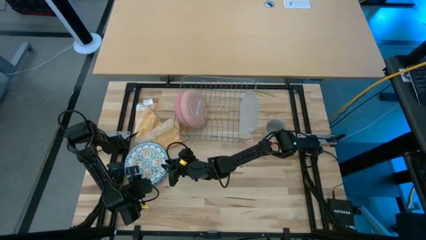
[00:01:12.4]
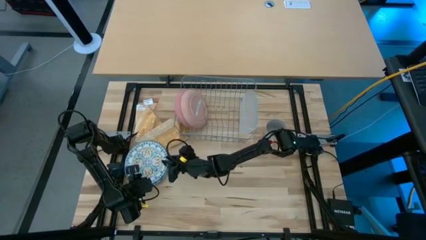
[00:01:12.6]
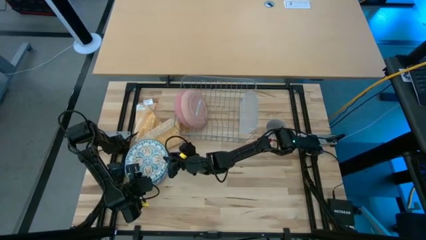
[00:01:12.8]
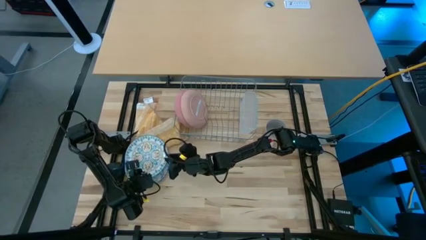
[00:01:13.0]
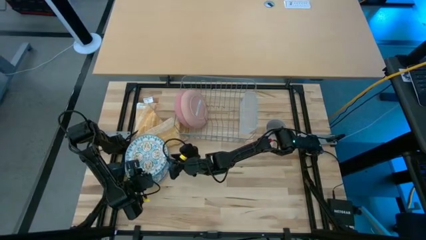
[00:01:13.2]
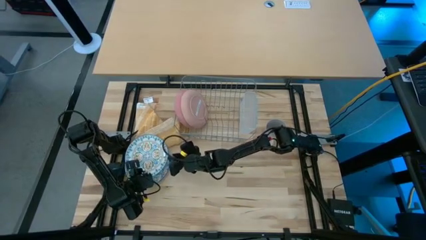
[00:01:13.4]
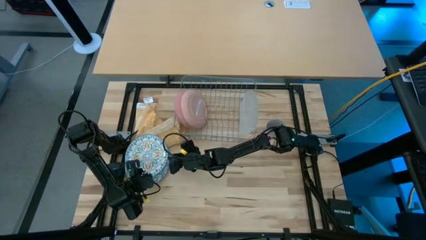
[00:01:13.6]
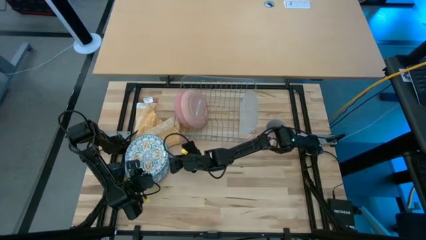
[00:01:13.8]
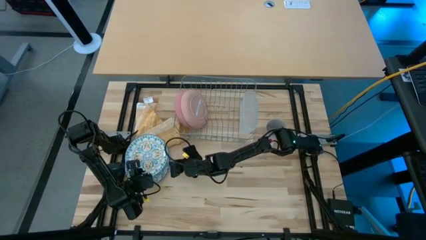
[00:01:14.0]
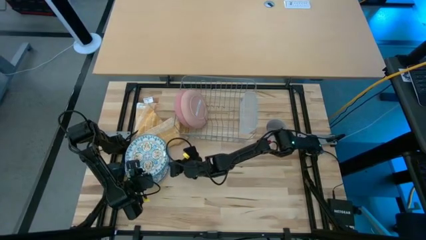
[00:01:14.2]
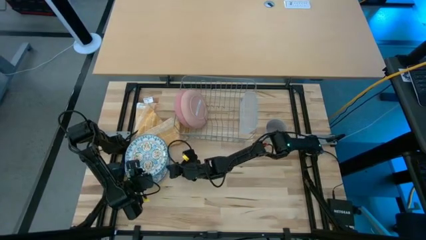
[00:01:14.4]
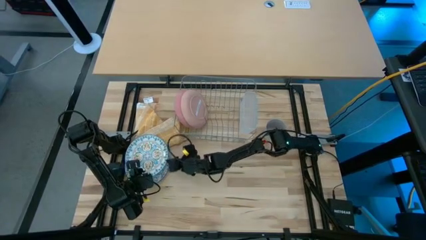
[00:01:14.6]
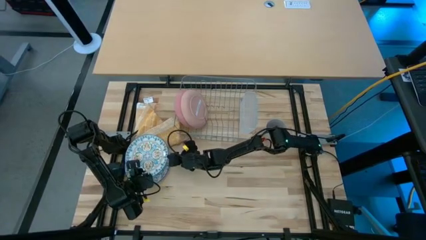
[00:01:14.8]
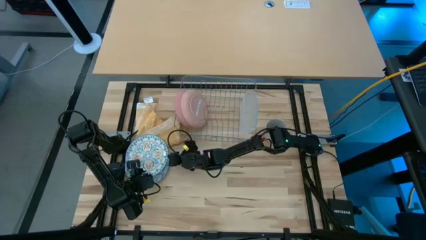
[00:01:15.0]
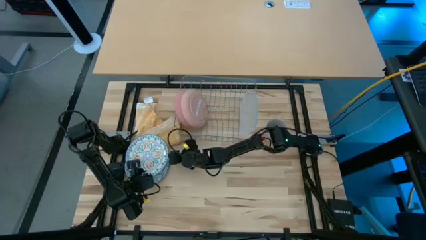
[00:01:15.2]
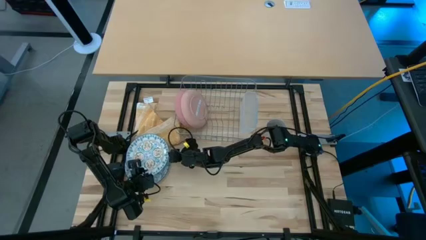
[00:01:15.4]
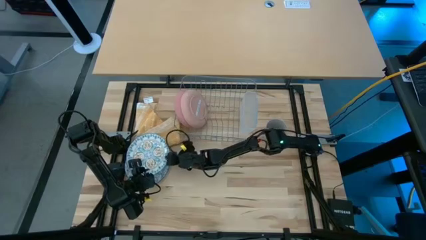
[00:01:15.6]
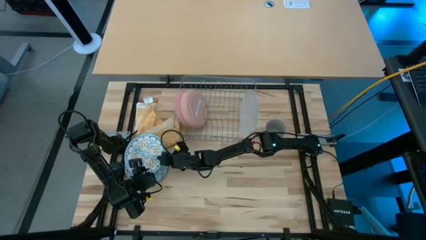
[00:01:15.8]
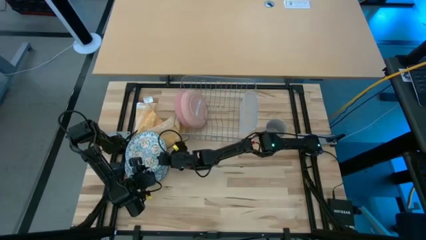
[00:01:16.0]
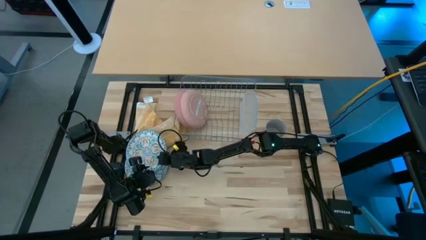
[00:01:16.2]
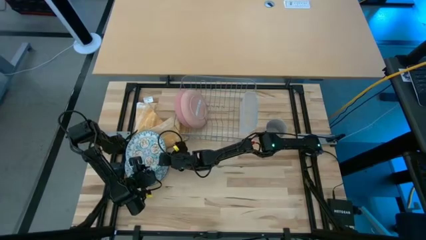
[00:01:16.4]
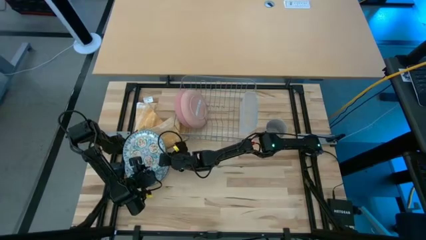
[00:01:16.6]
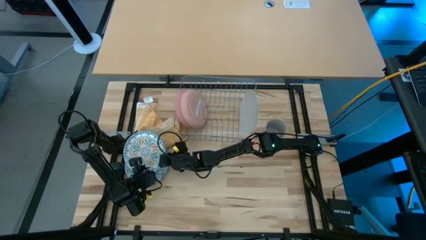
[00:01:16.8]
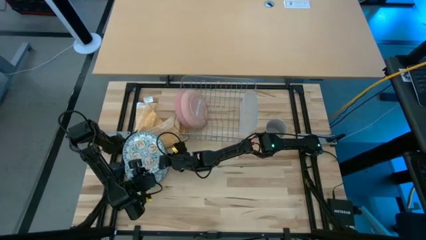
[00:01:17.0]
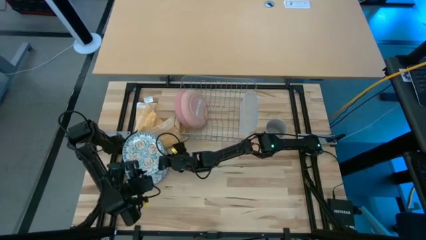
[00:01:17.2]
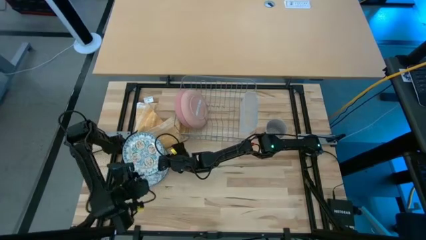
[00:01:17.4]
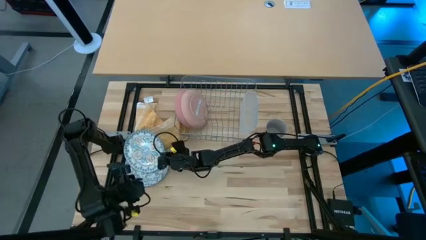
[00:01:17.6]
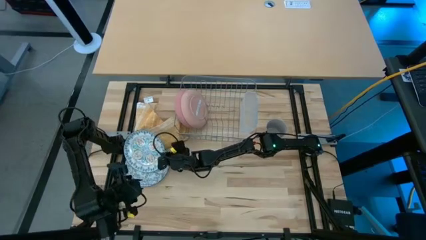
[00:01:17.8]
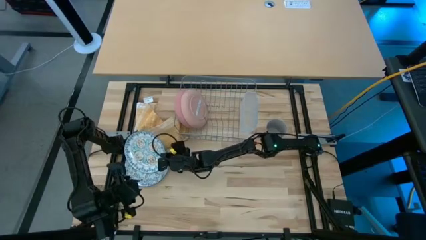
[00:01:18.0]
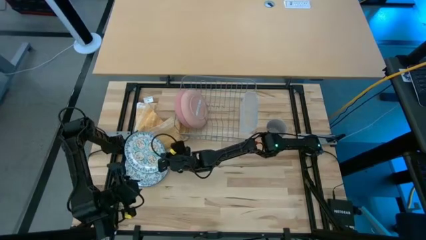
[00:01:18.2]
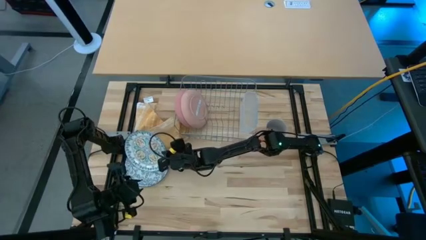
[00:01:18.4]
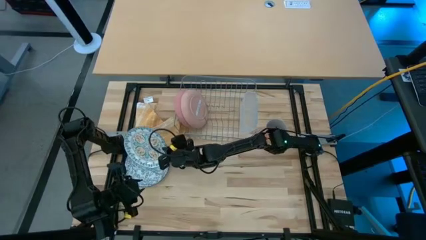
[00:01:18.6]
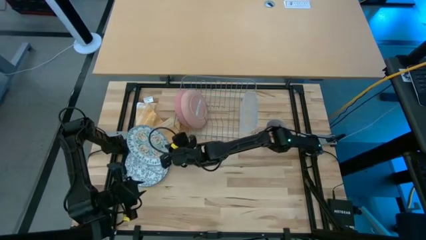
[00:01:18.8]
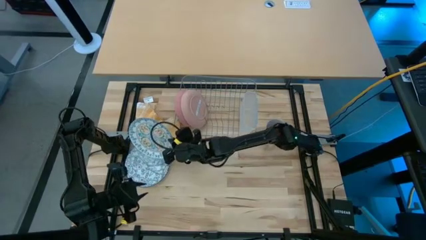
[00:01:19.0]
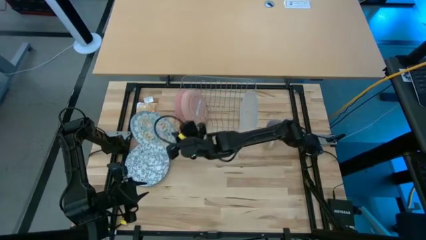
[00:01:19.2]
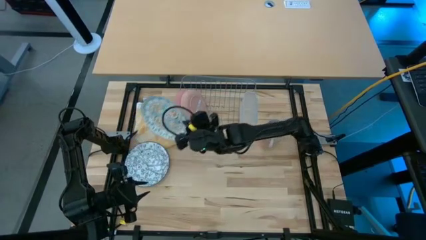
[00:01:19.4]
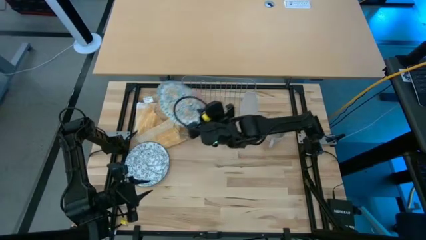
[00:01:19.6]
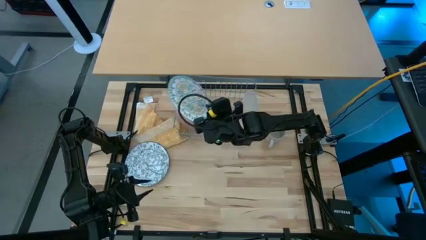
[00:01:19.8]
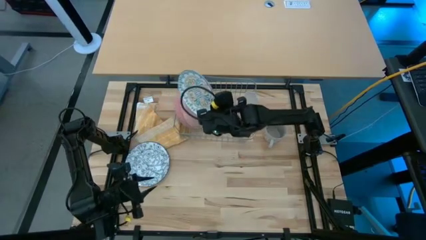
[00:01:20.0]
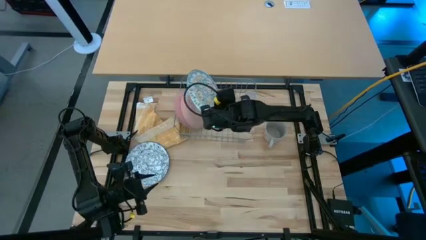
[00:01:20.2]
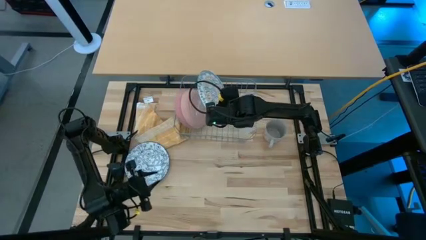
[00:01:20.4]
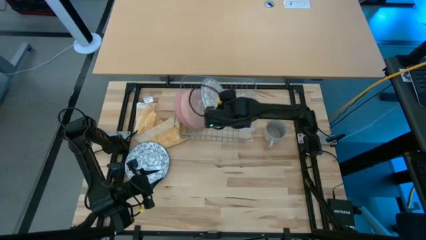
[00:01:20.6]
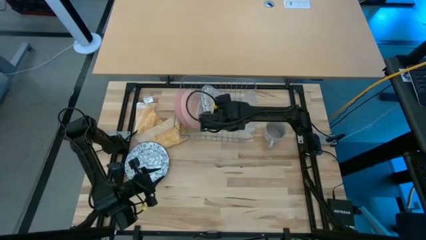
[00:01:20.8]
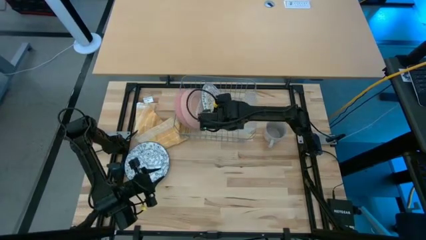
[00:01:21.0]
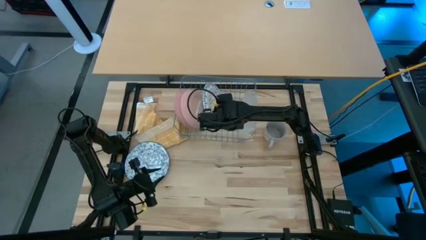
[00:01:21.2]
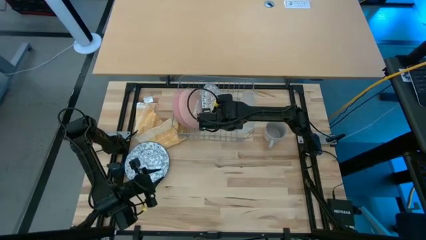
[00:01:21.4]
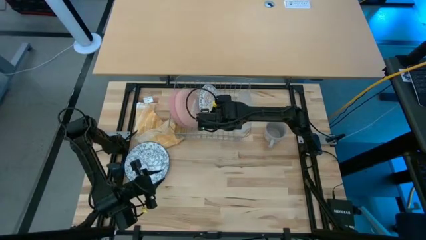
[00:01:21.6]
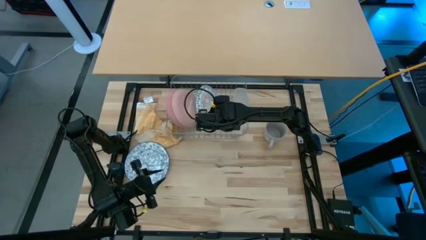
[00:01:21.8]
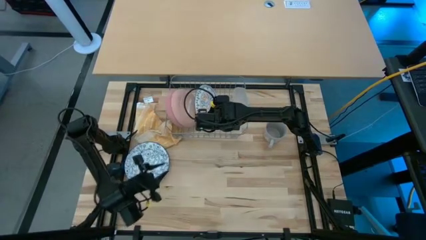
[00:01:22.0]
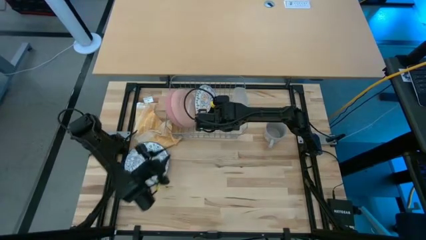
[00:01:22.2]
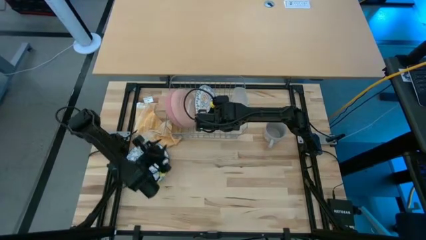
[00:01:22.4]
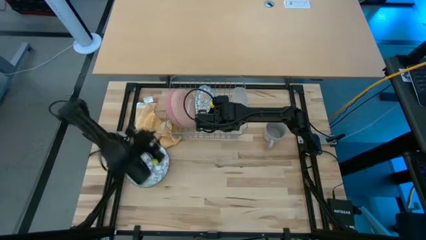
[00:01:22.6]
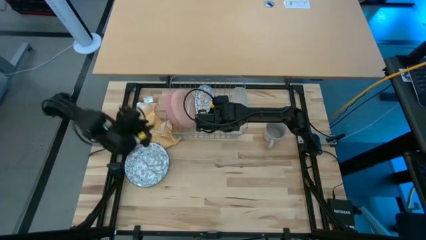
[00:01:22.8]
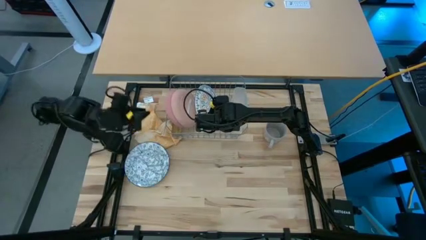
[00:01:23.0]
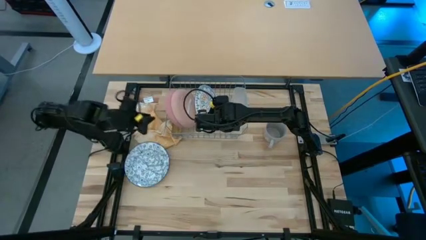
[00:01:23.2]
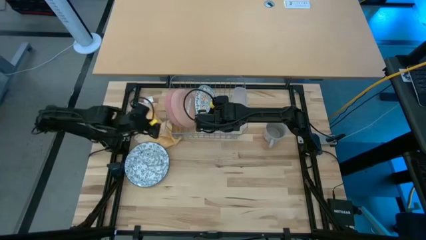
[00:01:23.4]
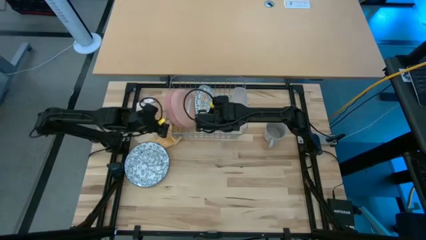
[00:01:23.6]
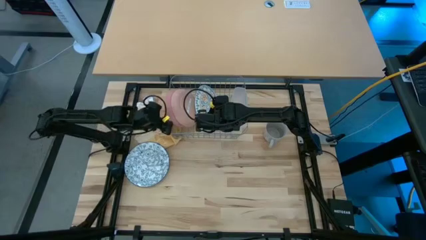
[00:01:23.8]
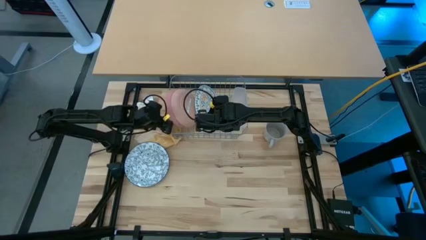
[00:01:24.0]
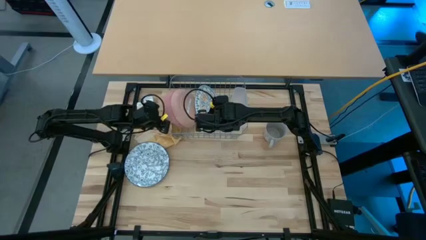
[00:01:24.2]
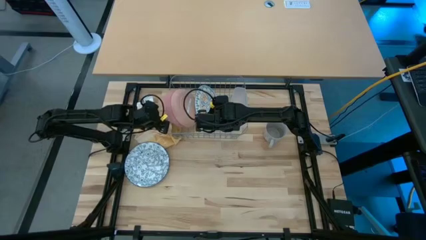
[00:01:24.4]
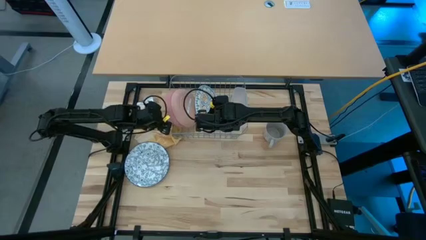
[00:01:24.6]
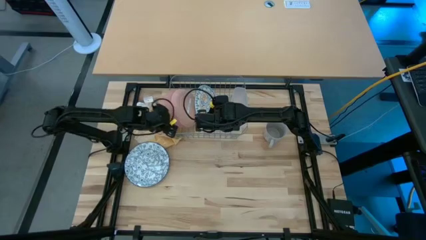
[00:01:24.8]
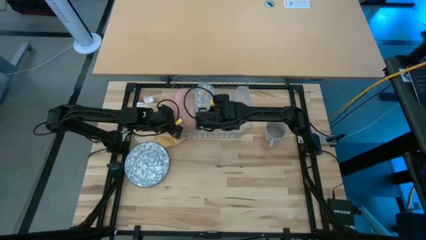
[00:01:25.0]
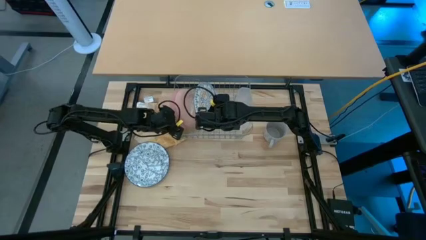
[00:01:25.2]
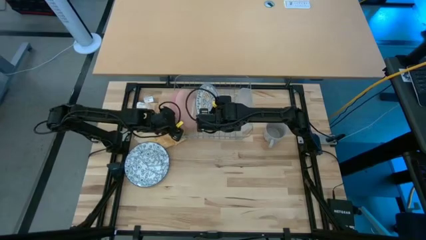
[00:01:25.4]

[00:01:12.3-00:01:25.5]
Task: Sort dishes
Put the white patterned plate in the dish rack

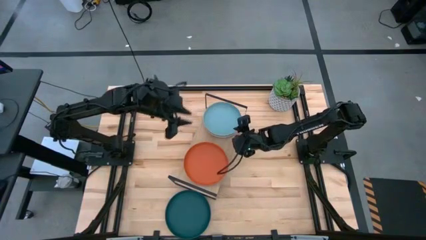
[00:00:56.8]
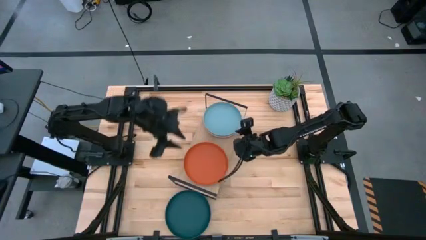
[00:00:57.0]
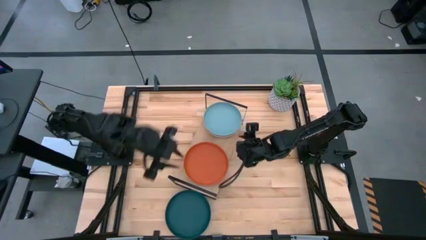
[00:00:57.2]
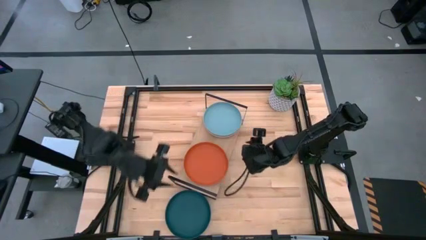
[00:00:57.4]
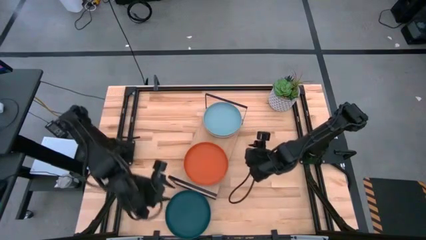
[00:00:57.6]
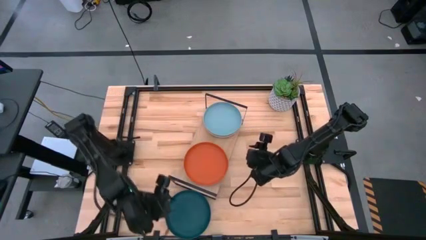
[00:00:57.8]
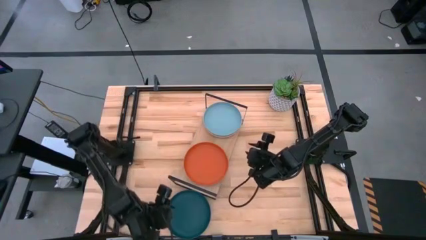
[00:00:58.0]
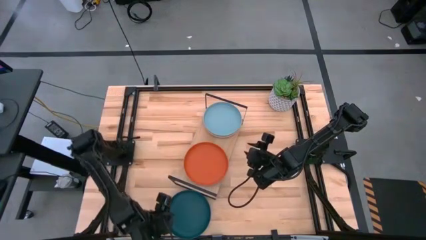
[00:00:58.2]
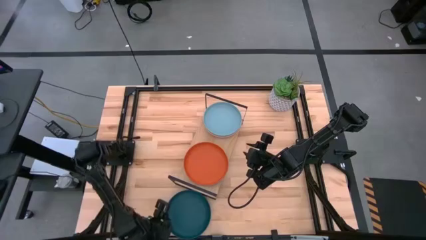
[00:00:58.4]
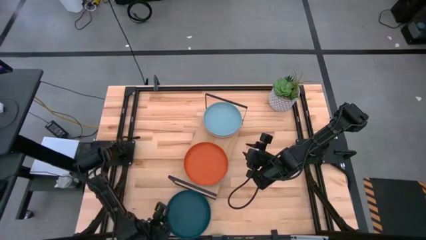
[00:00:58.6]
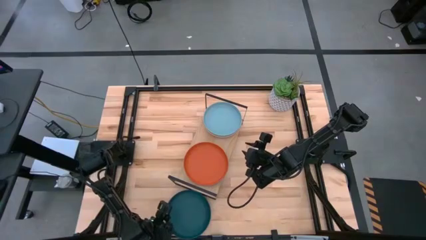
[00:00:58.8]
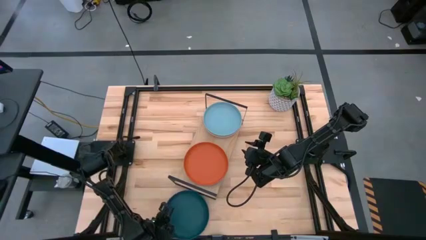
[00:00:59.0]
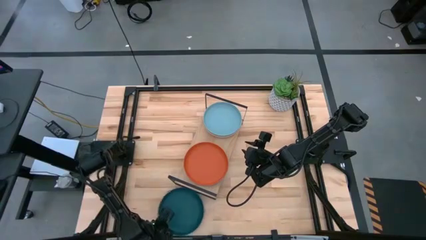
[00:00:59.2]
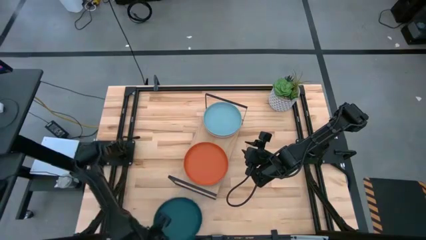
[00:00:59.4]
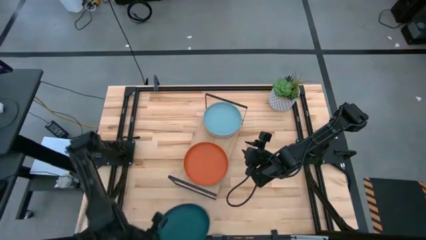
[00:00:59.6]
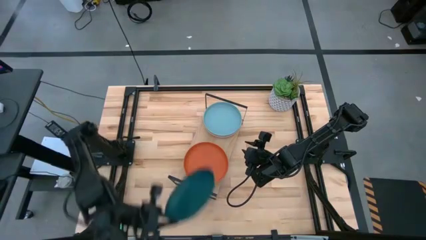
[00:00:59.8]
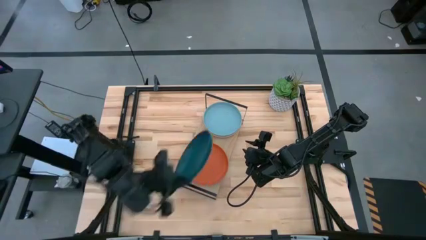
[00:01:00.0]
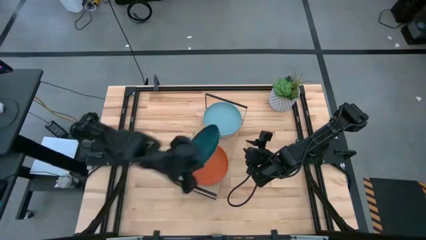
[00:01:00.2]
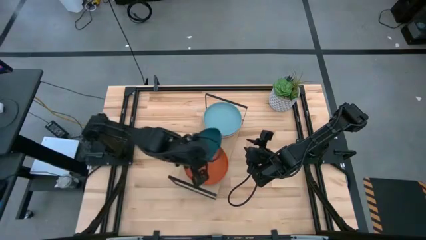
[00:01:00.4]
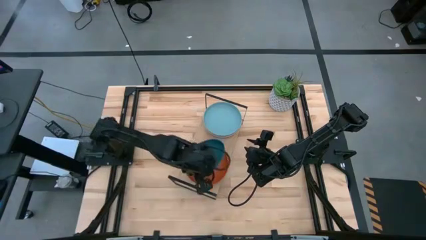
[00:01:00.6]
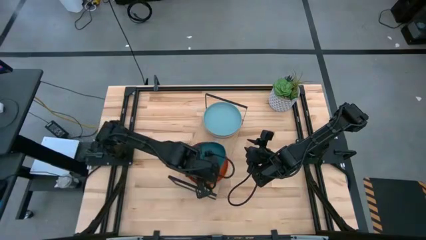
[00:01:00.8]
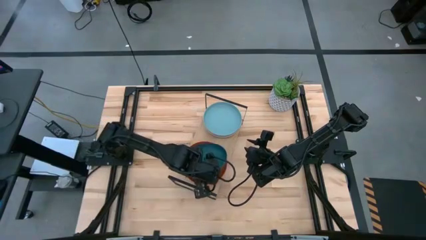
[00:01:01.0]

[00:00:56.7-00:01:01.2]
Task: Place and stack plates onto a shelf
Stack the dark blue plate on top of the dark orange plate on the shelf
